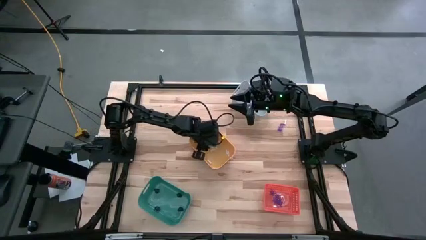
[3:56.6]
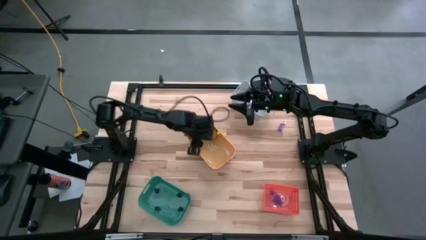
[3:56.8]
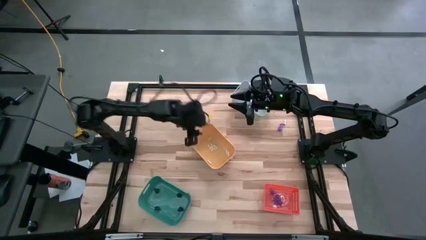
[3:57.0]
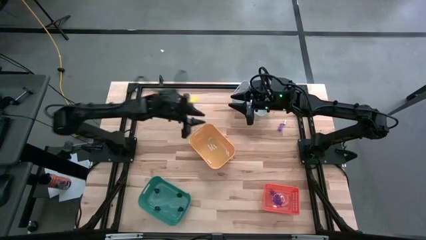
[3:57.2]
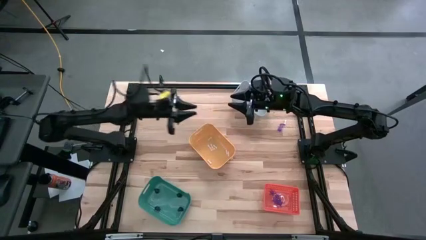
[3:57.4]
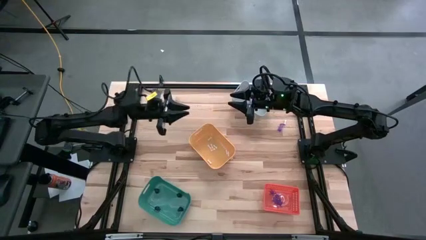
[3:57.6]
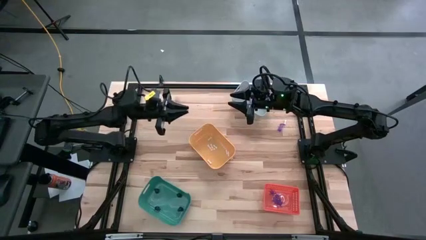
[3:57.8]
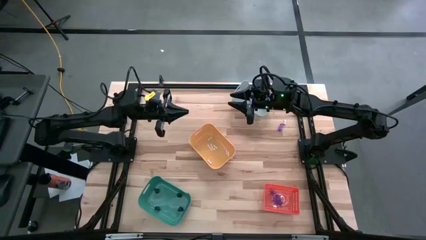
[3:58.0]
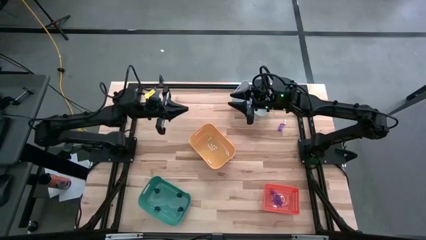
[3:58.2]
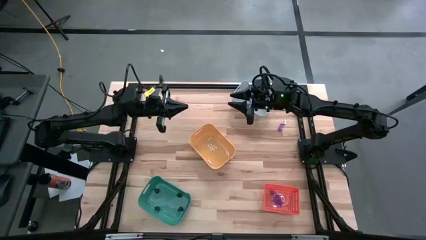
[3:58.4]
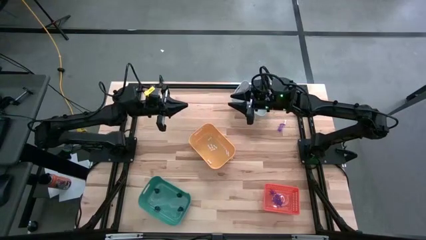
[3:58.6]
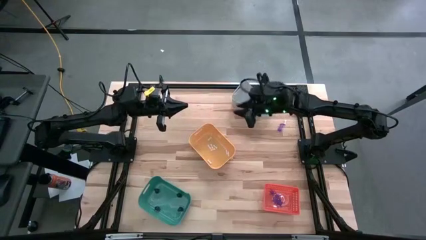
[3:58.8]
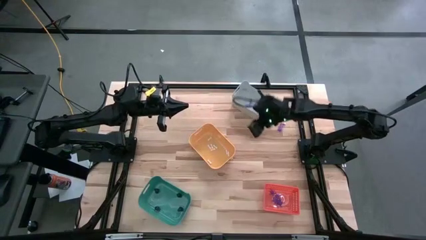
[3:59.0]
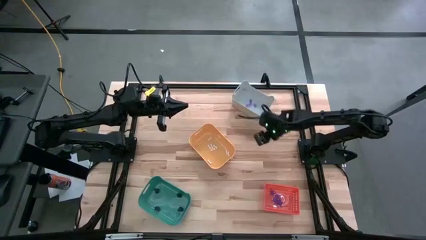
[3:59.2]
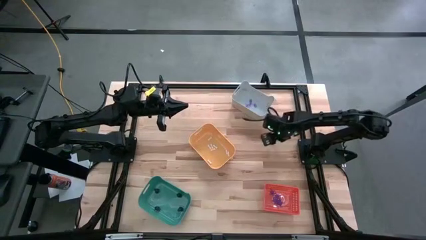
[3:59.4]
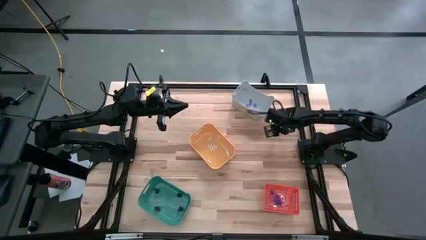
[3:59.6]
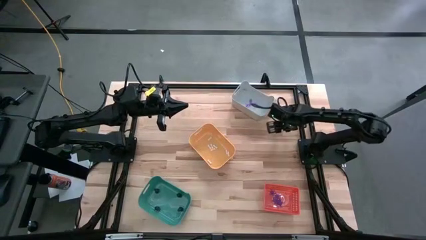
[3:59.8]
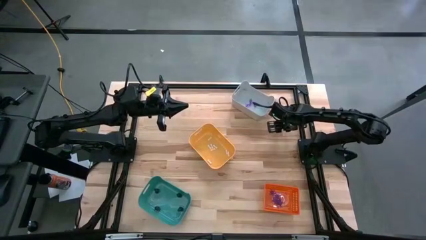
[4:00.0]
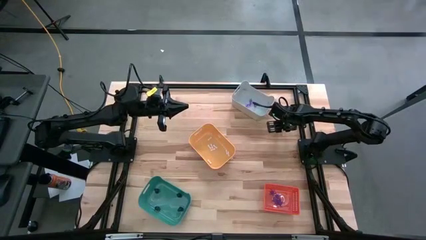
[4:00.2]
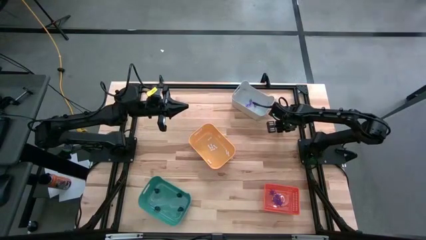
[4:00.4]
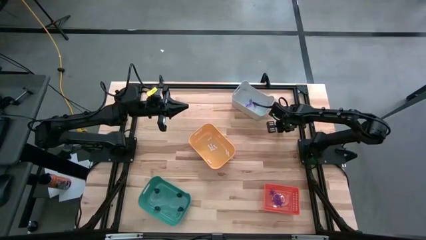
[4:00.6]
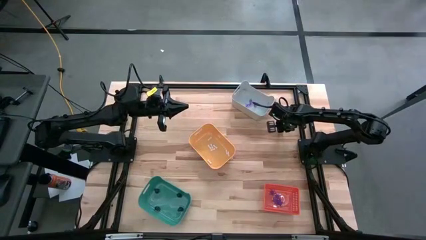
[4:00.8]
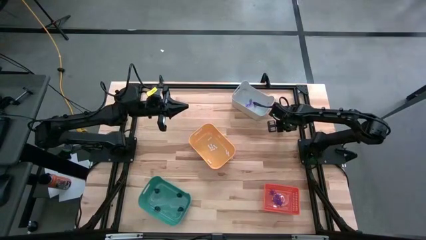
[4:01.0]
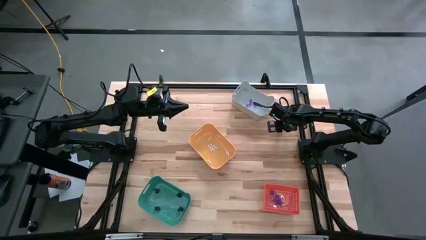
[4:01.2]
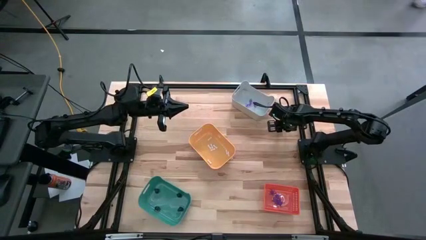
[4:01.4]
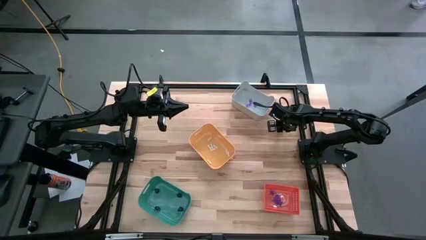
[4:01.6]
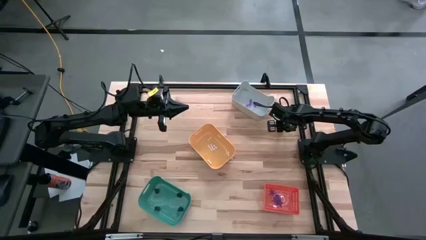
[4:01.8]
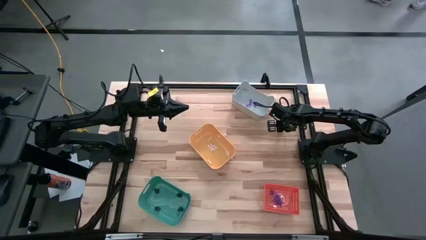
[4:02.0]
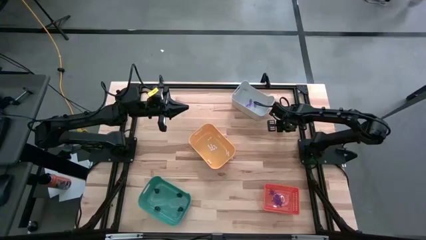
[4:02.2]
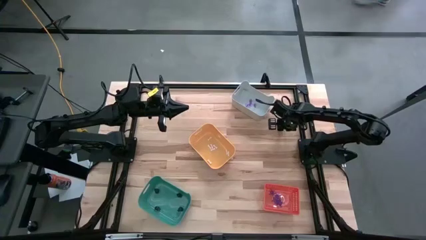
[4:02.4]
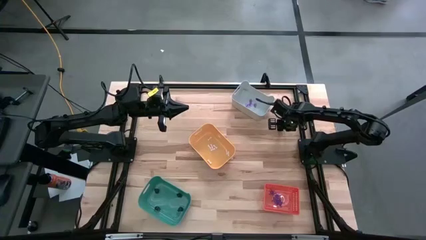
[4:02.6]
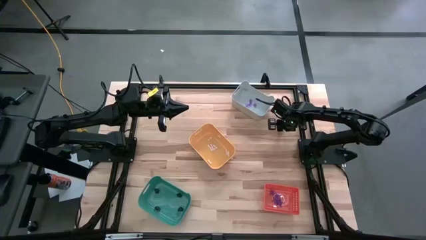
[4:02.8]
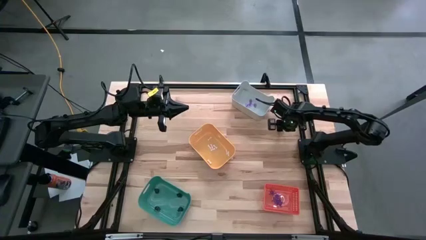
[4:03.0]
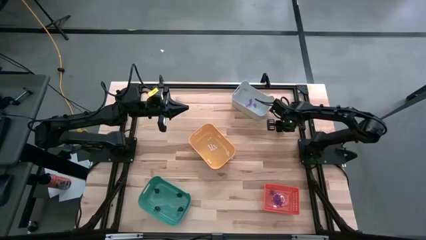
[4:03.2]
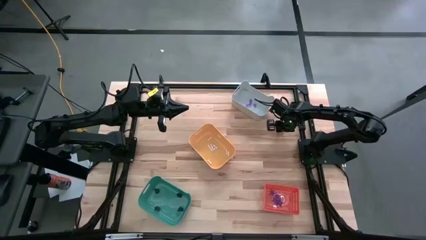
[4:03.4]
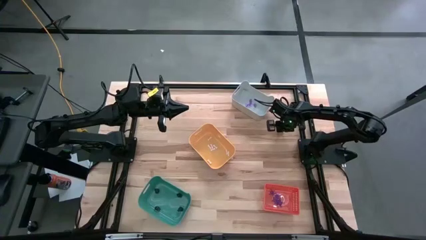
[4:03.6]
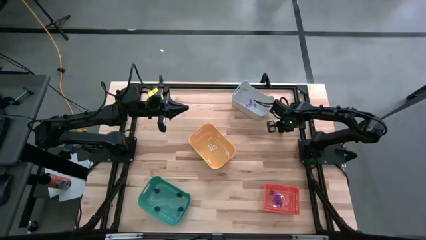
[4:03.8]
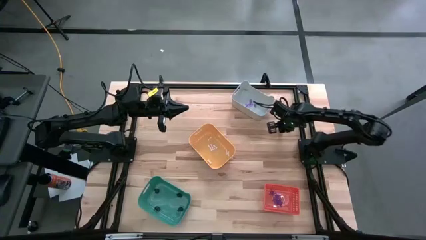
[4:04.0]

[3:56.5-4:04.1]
Task: Sort Halloween decoration
Put the purple spider toy into the orange bin

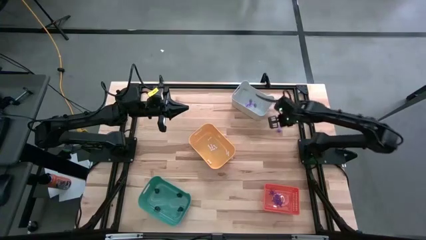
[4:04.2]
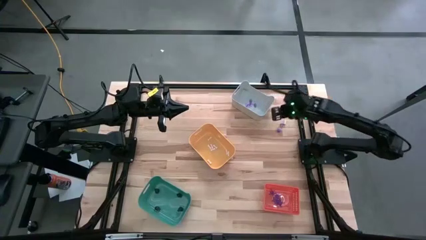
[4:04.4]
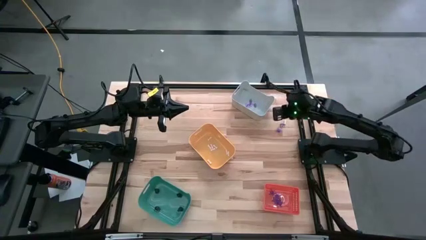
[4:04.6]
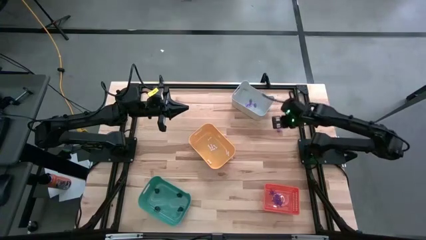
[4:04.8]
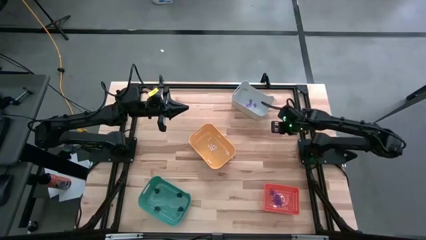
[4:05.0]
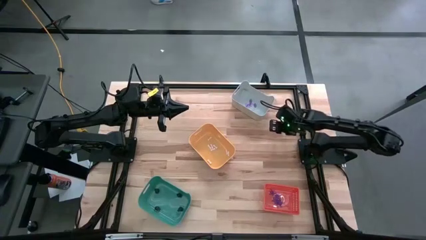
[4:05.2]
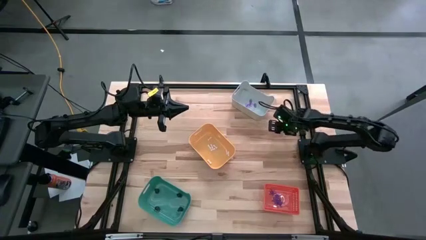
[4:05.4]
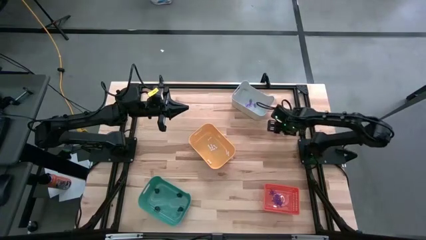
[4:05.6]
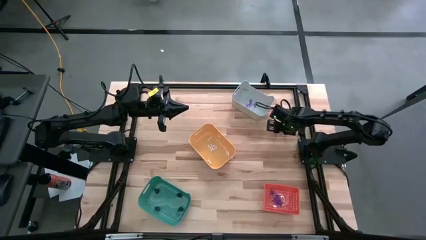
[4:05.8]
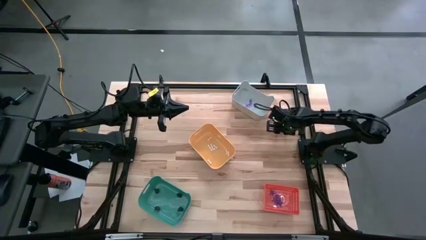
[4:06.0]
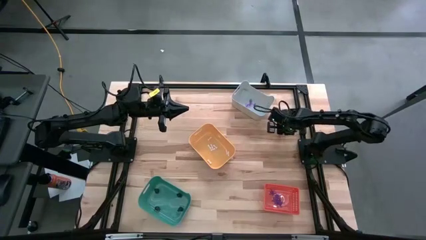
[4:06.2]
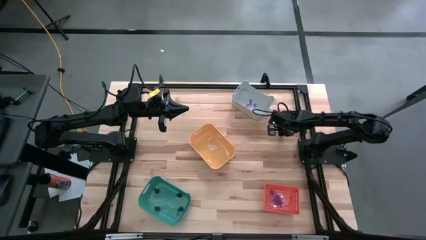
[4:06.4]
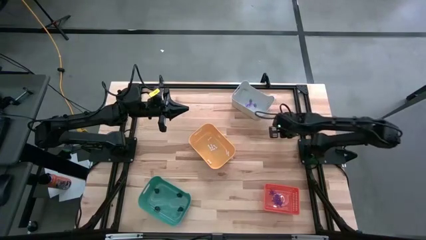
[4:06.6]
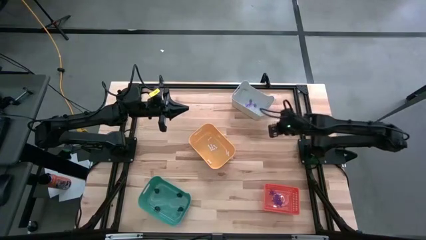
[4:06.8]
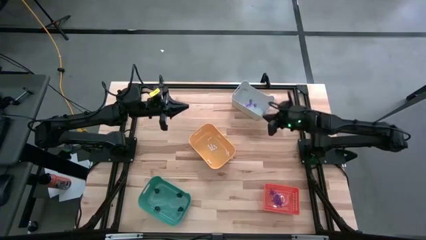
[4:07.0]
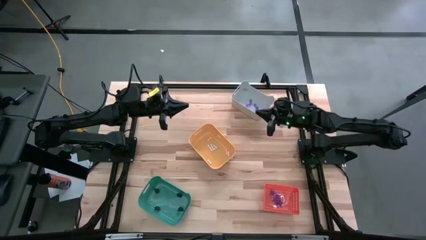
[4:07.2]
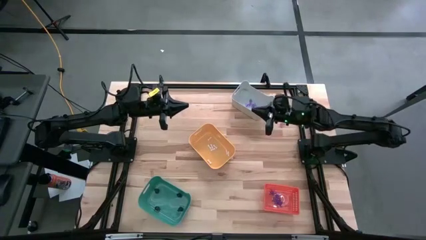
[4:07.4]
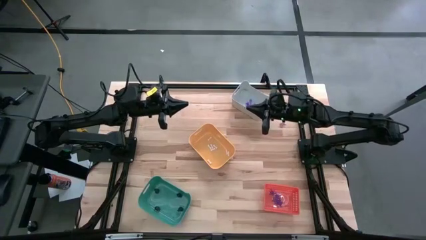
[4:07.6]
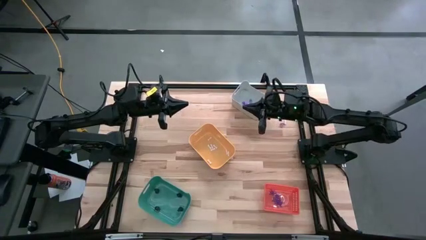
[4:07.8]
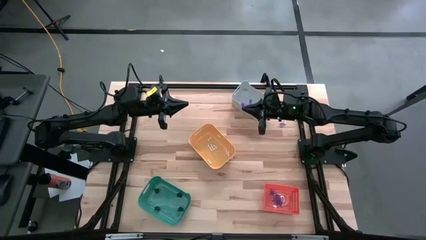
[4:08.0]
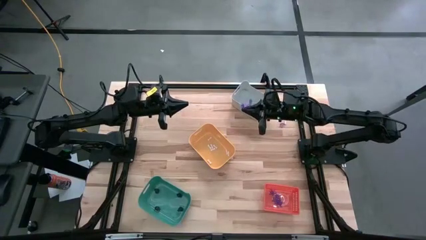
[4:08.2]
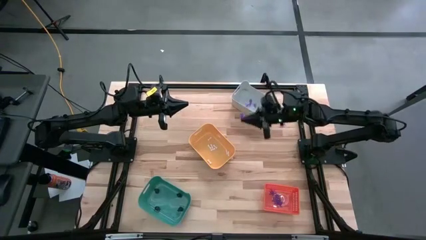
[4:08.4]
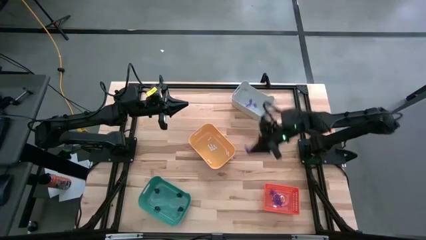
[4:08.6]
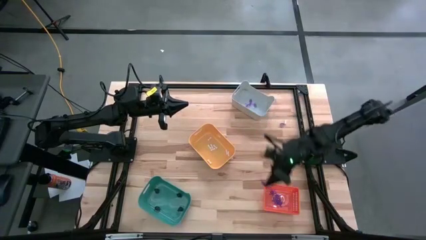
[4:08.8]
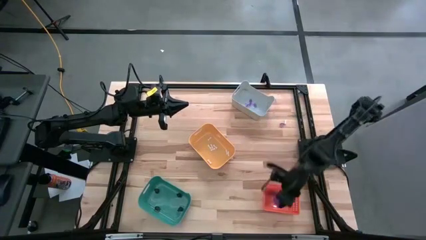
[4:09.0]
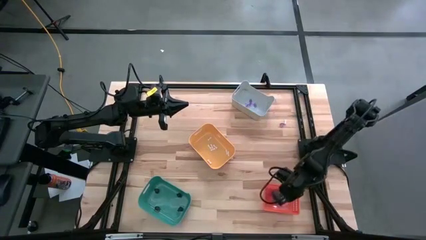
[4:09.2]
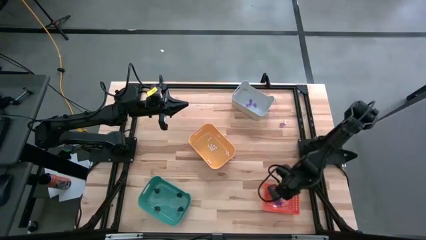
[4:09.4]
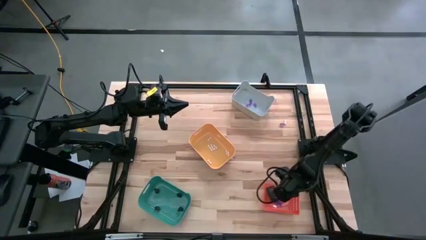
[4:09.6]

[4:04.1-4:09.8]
Put the purple spider toy into the orange bin

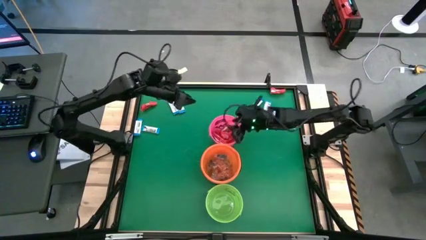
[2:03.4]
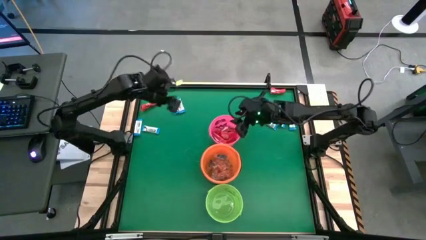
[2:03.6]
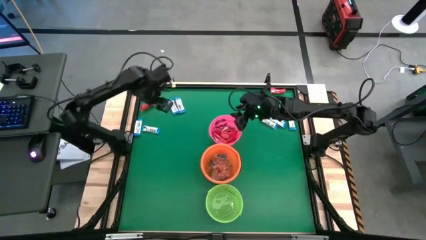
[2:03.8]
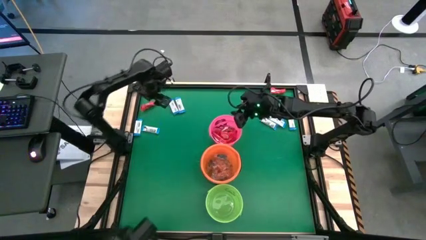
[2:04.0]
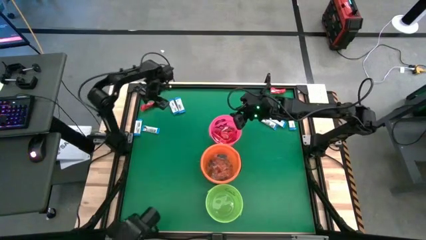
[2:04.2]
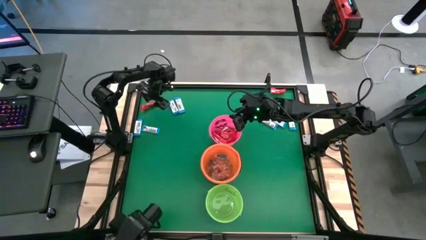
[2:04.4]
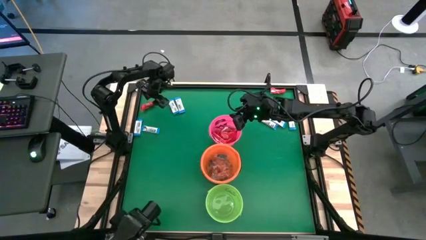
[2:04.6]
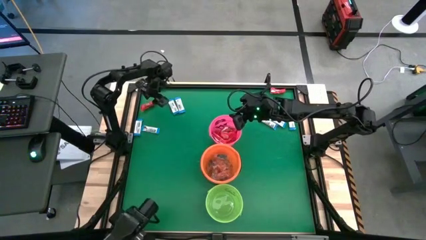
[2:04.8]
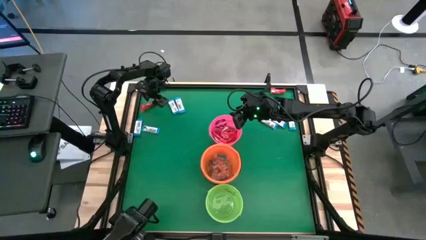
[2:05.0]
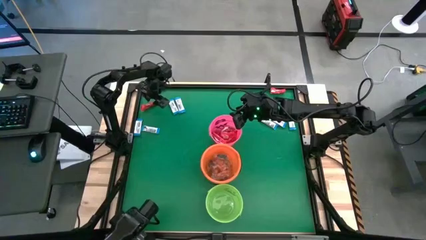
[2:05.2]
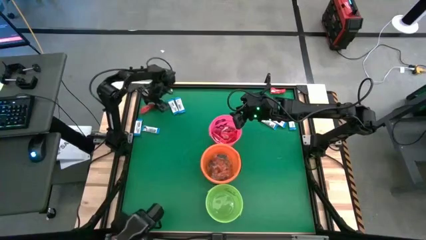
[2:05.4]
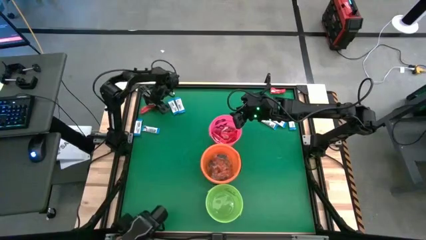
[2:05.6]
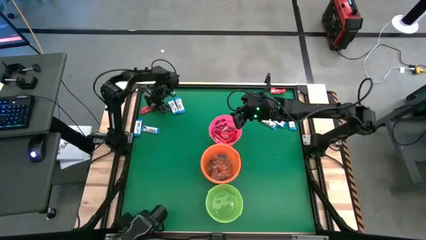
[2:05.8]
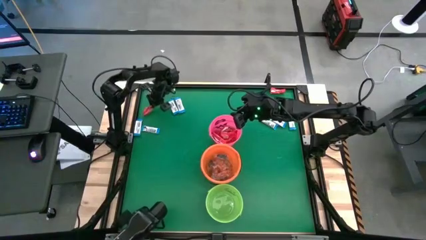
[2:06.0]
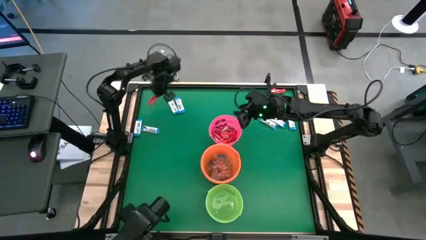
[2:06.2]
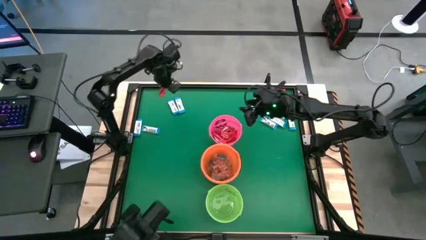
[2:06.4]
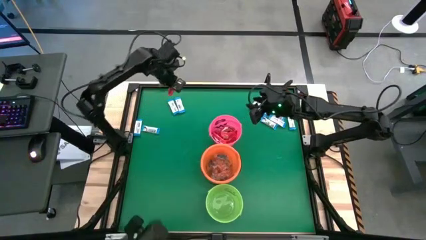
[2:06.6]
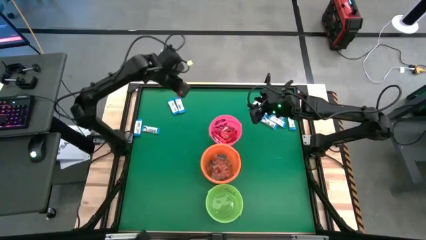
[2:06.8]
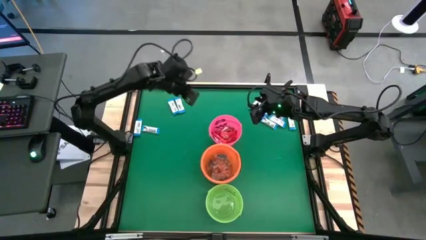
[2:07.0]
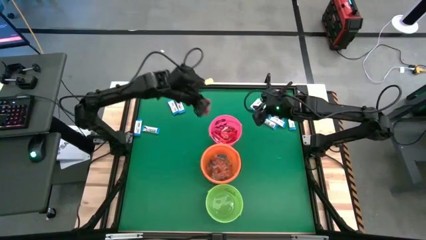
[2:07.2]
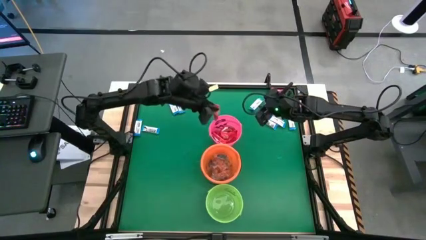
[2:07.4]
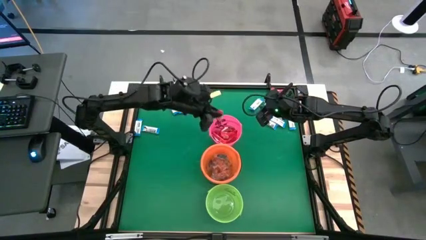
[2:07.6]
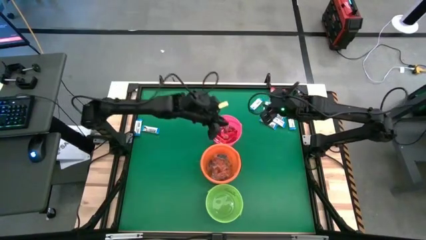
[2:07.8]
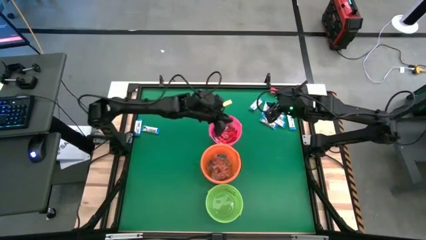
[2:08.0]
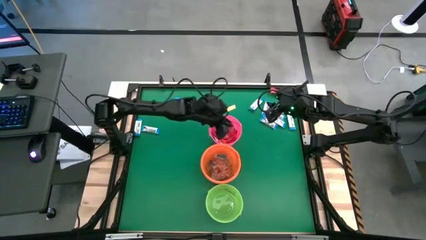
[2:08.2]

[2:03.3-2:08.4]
Task: Sort candy by brand, put in halloween buckets
Put the red chocolate into the pink bucket
